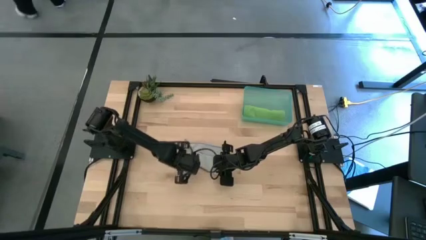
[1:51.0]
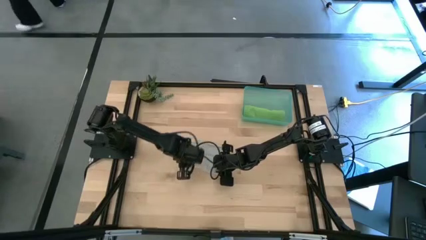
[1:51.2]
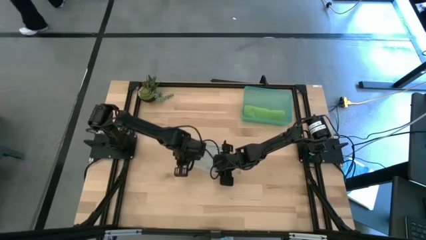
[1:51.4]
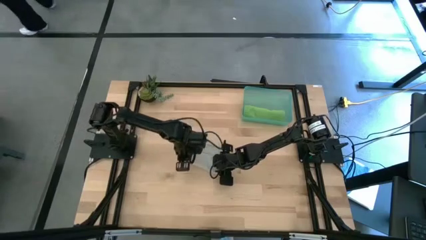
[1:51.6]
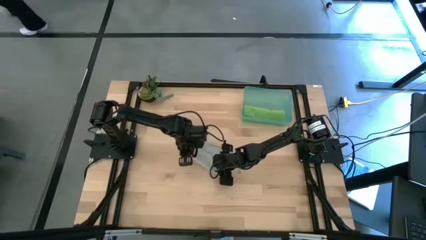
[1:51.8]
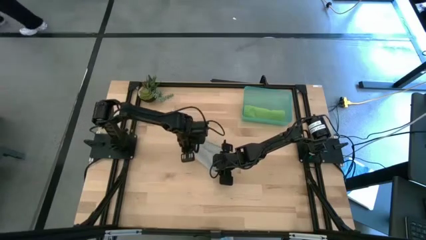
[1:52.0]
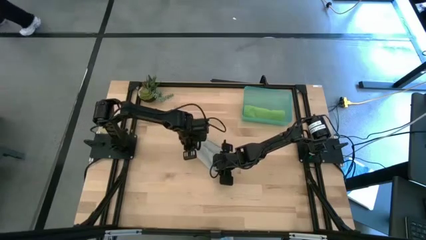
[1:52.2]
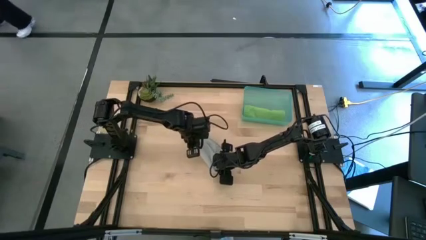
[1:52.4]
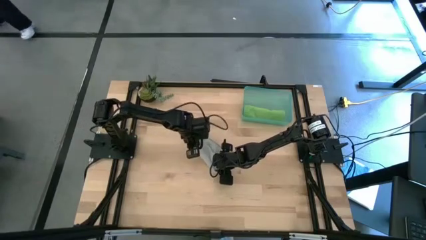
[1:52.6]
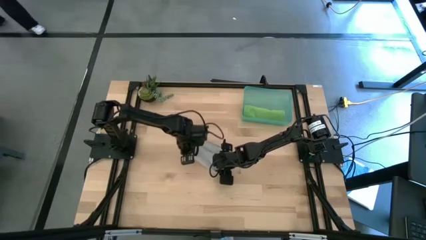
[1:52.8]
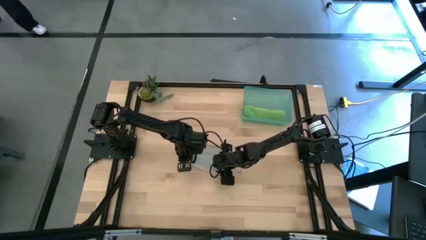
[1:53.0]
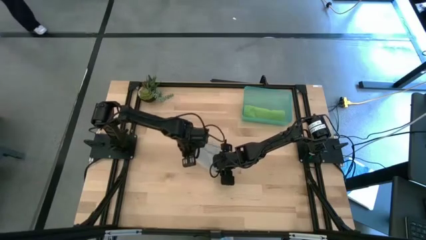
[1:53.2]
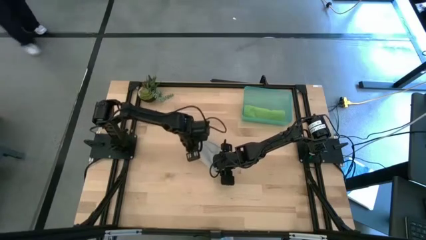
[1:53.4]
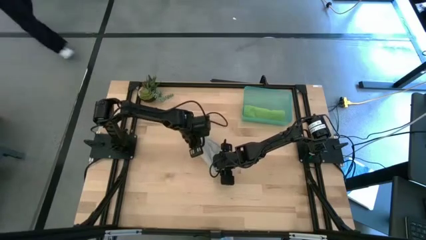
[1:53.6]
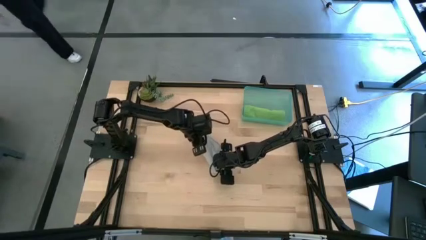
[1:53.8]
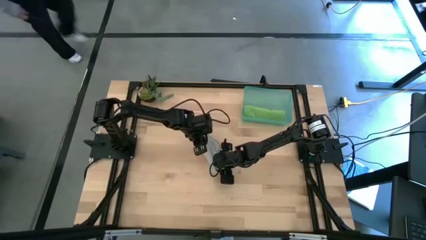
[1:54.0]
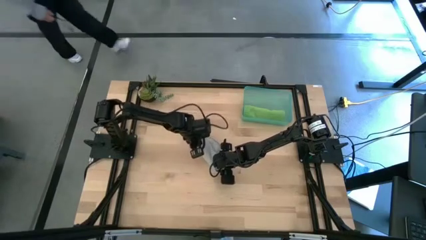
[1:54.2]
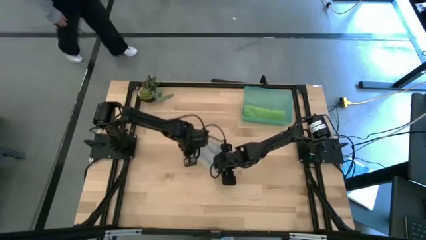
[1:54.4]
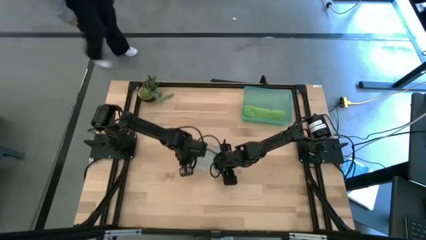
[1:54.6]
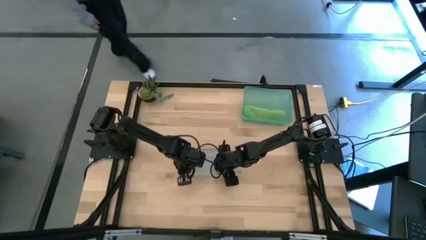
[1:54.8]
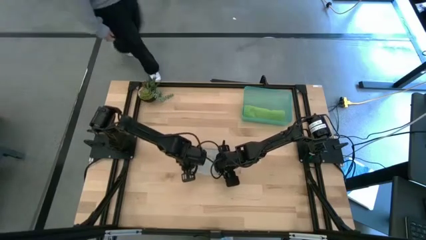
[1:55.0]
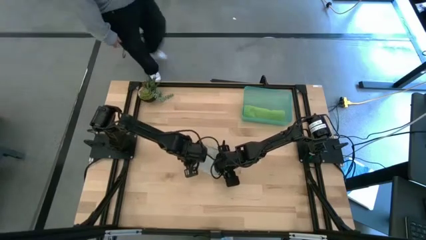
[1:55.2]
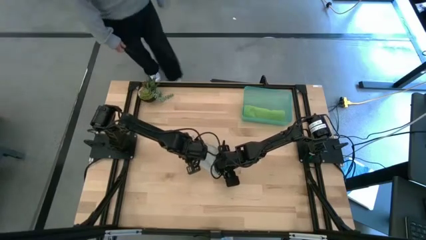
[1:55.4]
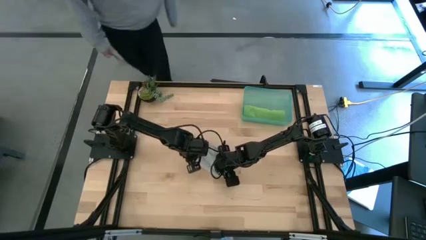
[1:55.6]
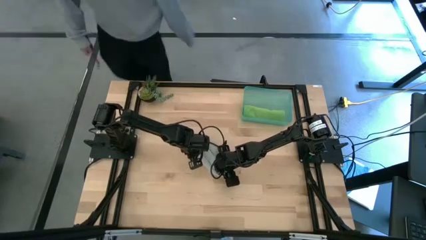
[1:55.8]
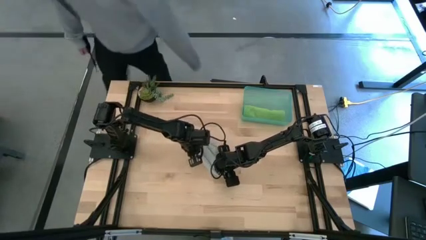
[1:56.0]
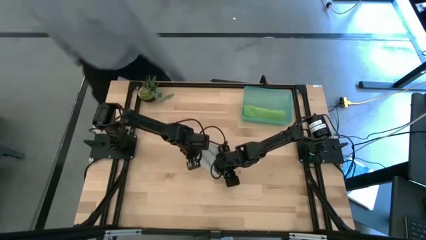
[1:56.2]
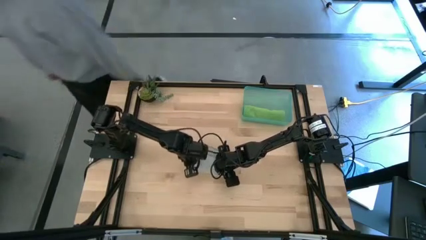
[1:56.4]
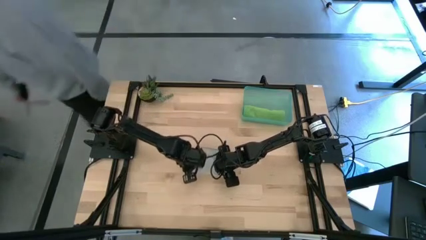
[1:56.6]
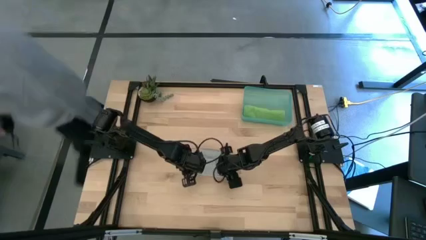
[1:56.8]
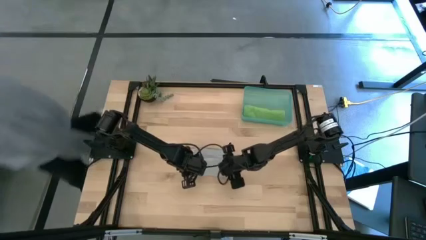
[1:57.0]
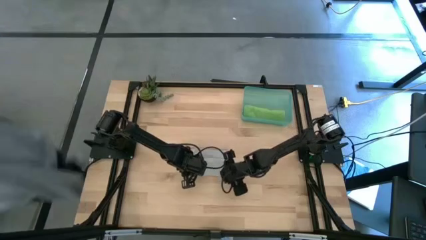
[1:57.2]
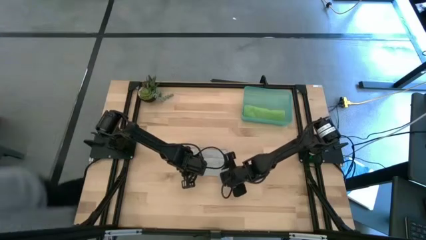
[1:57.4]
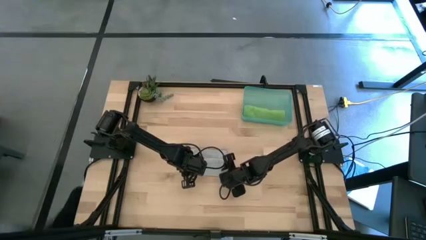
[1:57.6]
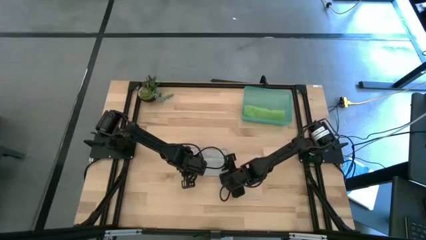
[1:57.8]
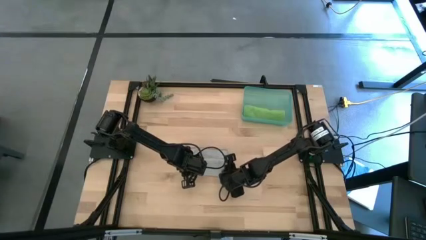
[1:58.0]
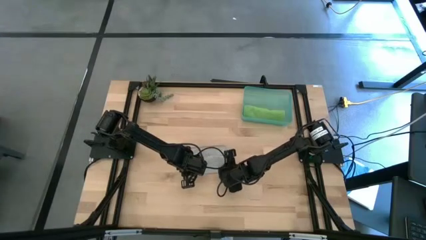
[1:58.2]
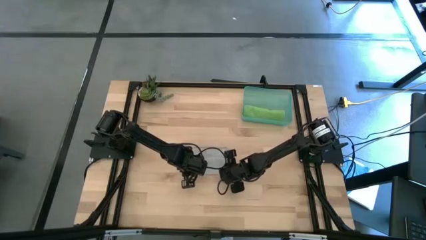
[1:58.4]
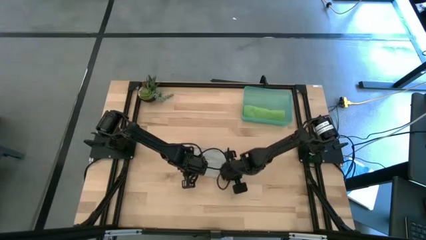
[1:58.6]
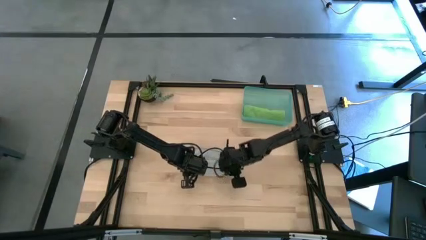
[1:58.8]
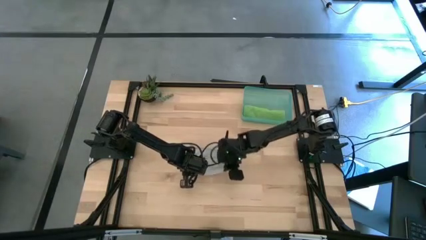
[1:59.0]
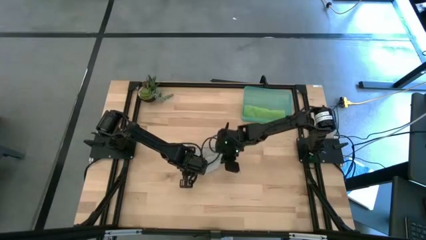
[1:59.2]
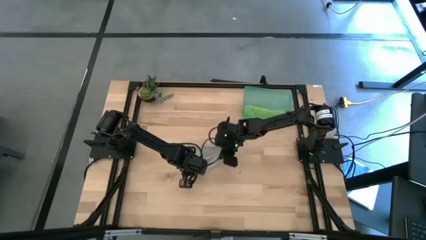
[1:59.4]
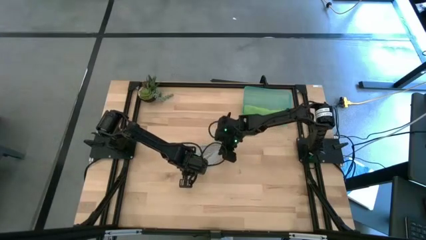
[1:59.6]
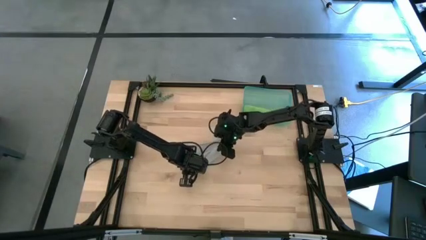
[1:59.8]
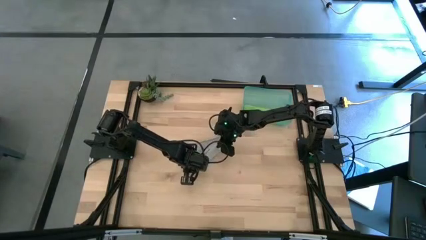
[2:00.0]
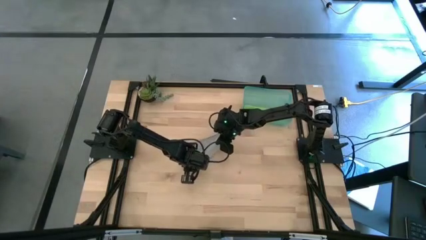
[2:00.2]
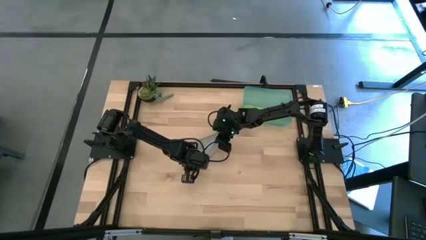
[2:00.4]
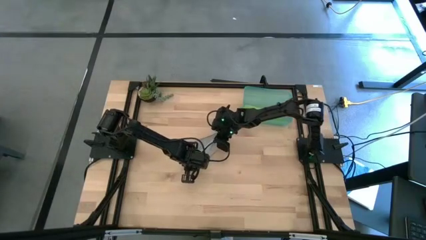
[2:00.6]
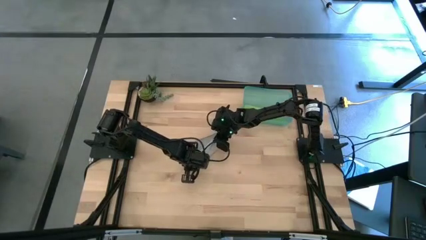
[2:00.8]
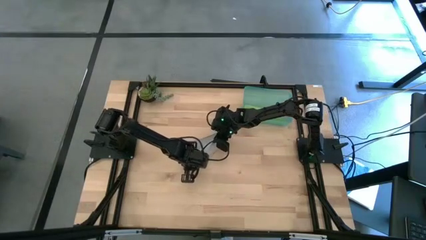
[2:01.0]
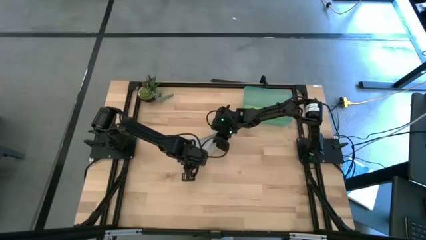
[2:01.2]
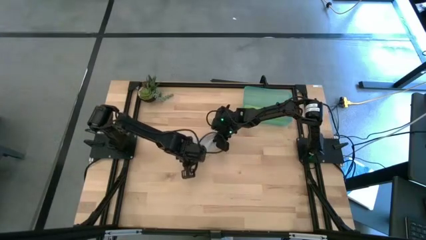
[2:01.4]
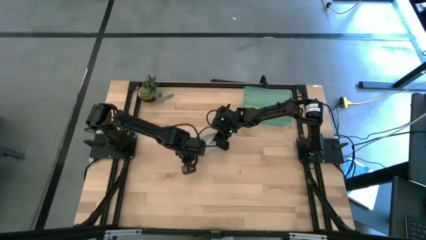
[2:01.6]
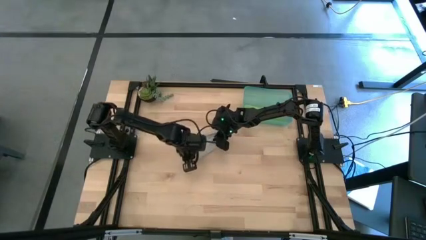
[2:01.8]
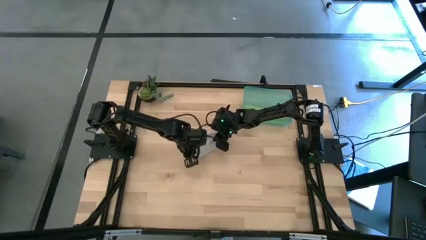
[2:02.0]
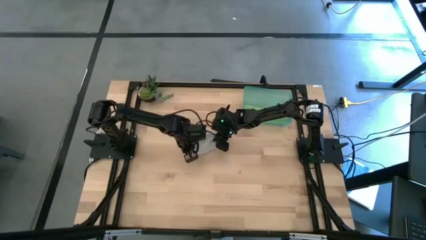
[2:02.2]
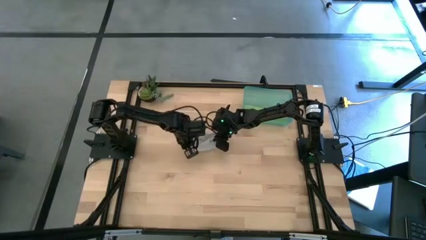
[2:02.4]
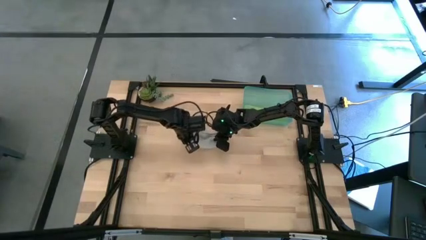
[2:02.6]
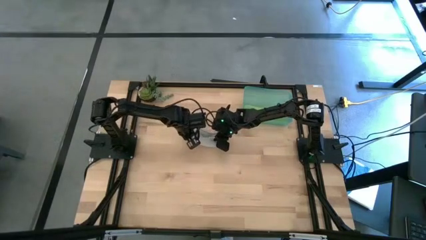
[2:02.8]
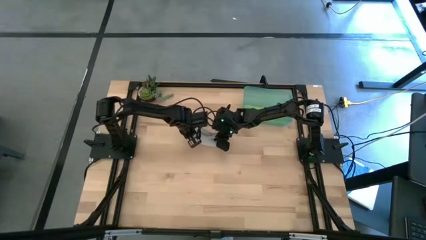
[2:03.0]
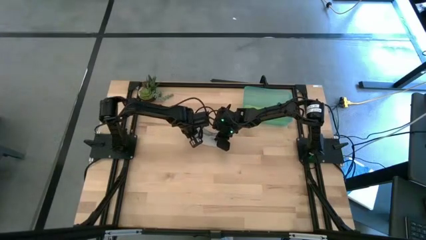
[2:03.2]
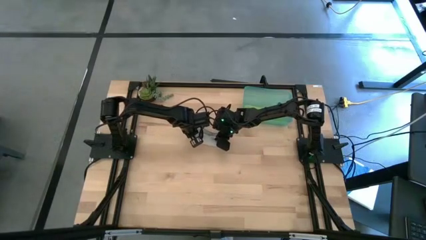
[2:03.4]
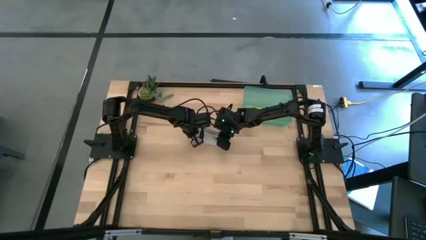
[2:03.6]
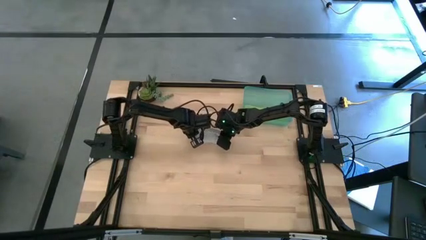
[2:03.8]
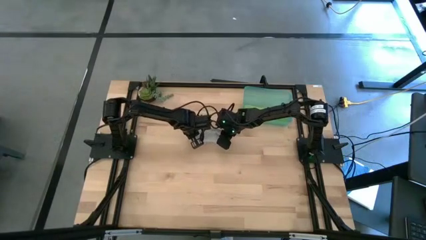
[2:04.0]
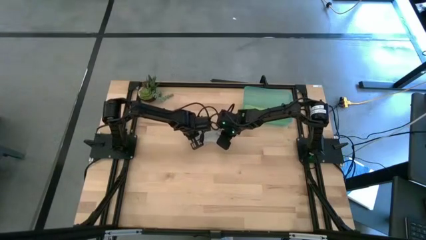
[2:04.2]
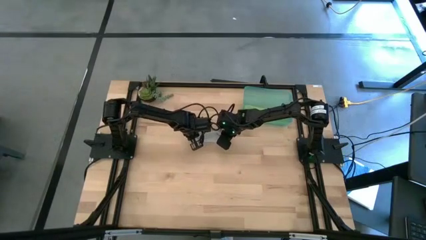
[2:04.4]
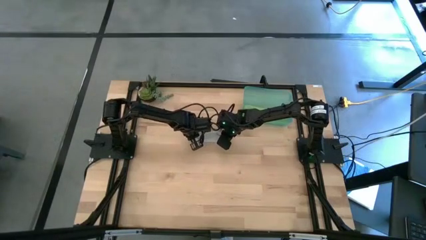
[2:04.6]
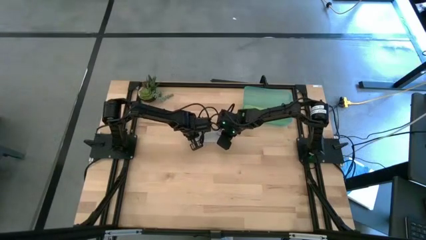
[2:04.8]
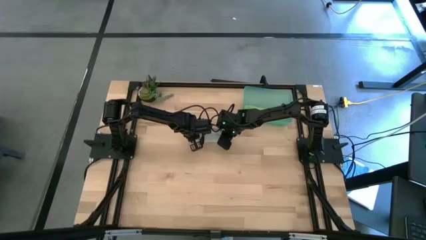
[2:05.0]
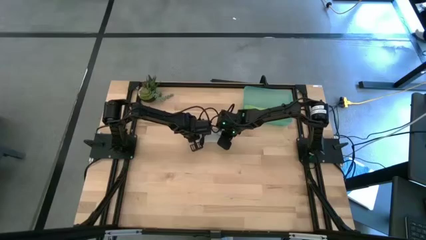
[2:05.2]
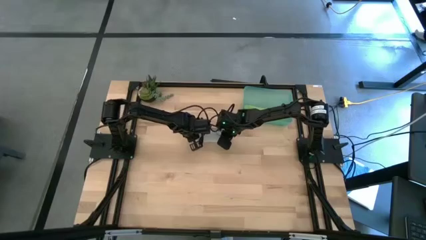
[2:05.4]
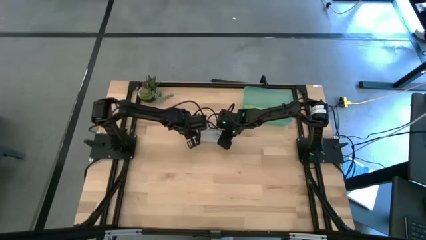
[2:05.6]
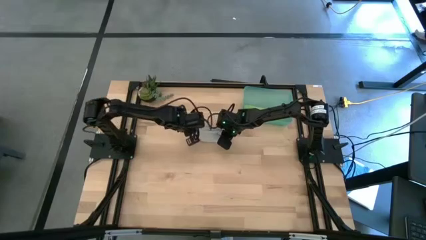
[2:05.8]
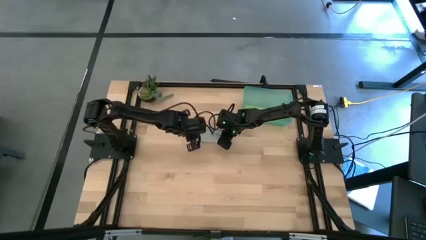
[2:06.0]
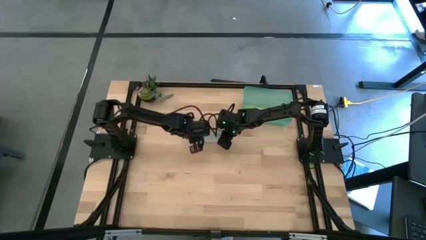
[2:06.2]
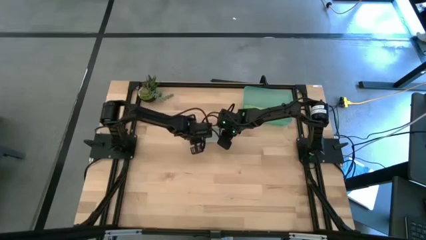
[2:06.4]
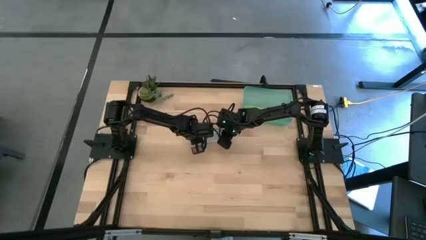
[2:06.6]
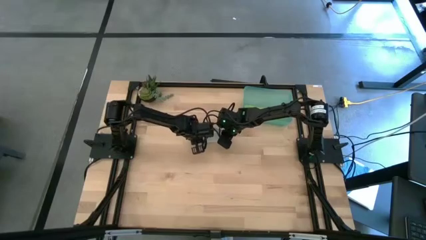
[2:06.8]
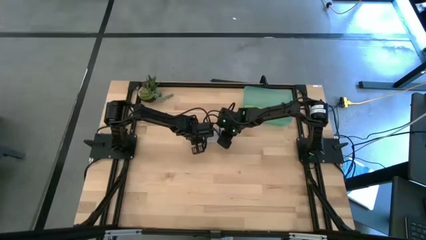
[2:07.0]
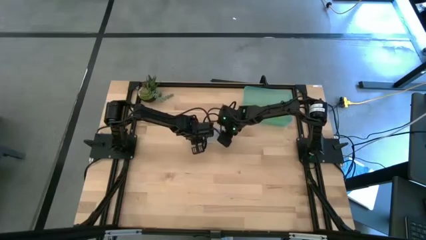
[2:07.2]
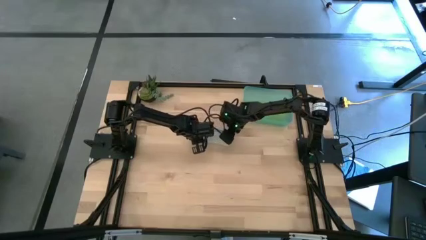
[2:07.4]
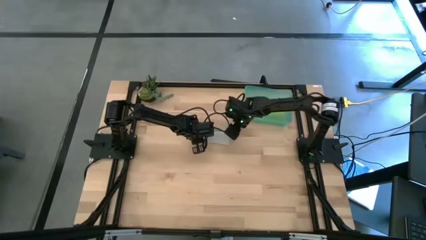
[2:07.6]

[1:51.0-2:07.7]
Task: Roll microfiber towels into tight, uniform cylinder then place into a basket
Roll the gray kitchen towel
